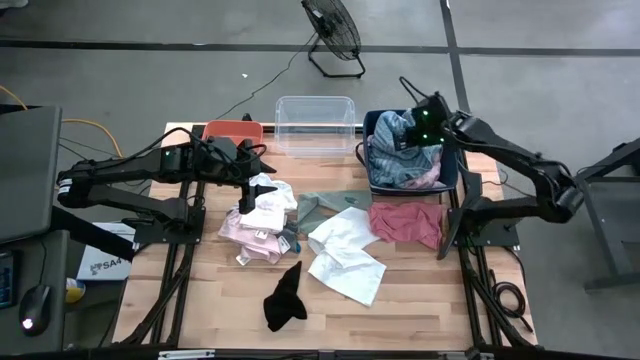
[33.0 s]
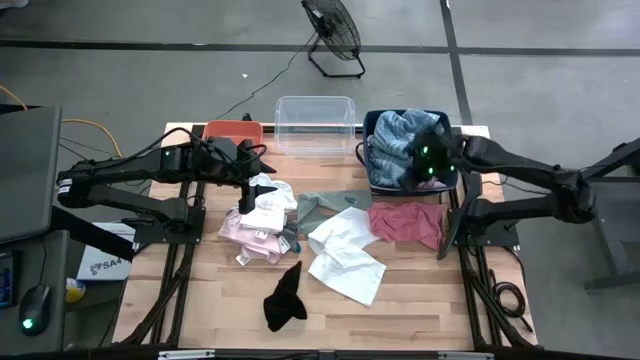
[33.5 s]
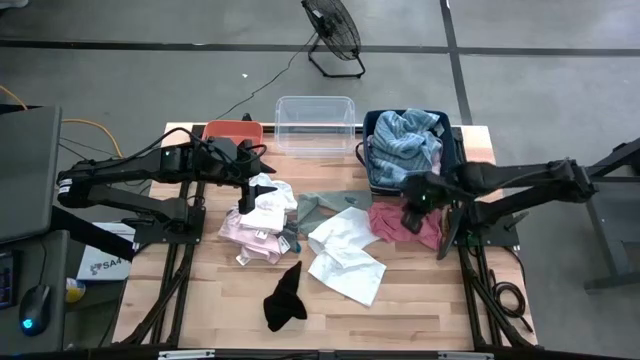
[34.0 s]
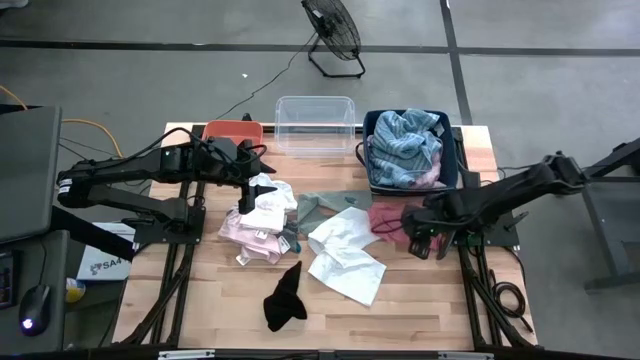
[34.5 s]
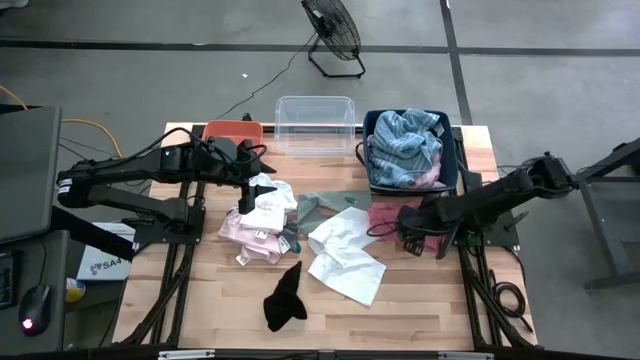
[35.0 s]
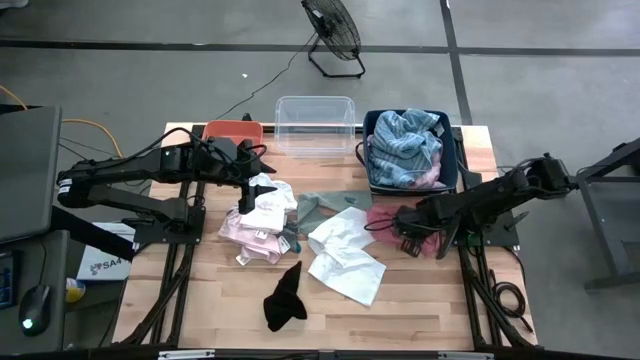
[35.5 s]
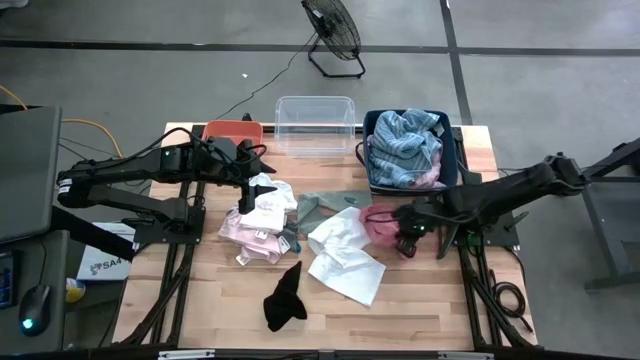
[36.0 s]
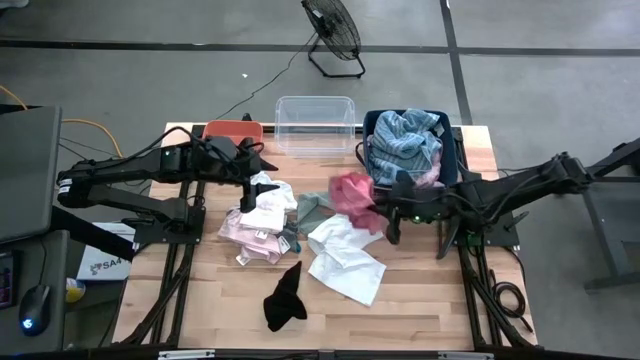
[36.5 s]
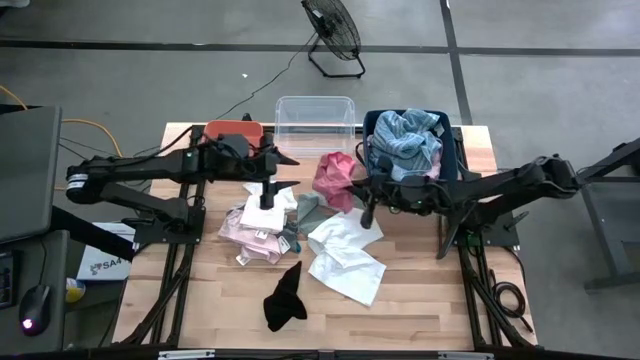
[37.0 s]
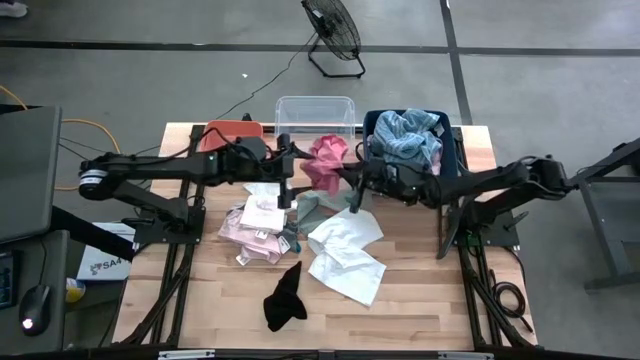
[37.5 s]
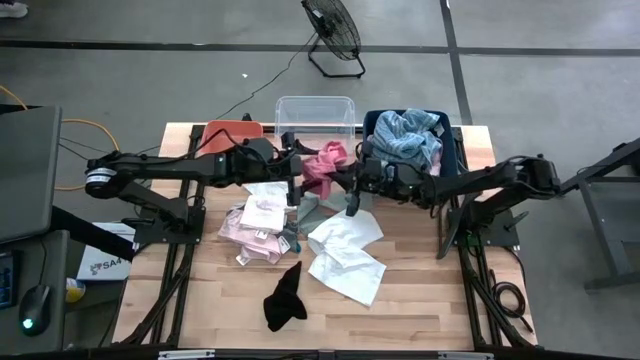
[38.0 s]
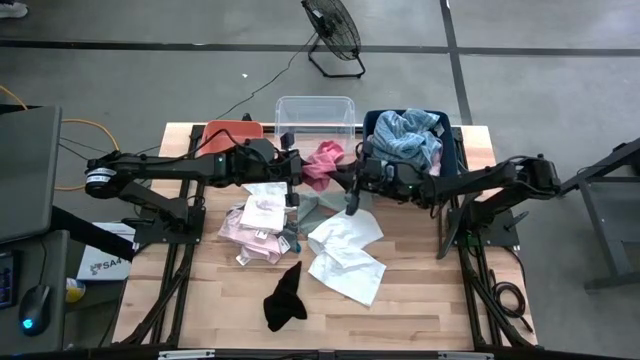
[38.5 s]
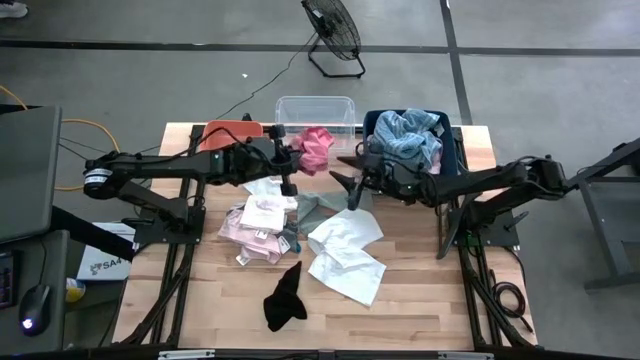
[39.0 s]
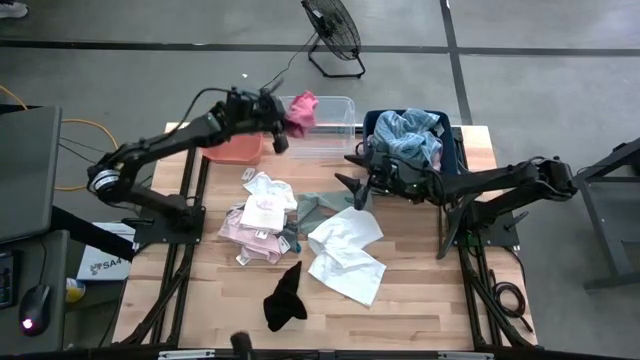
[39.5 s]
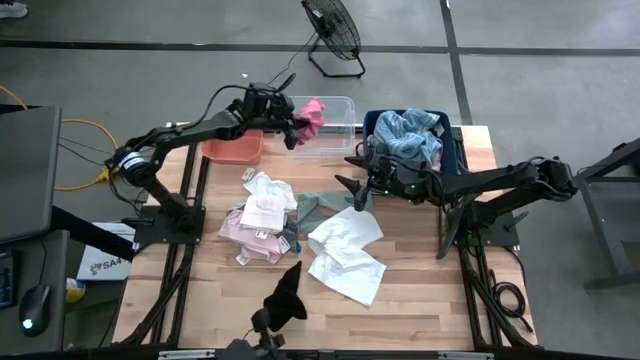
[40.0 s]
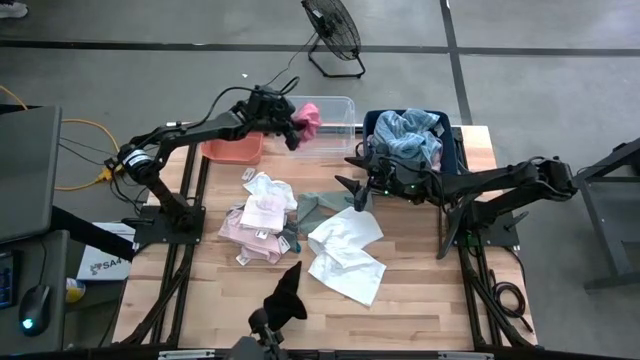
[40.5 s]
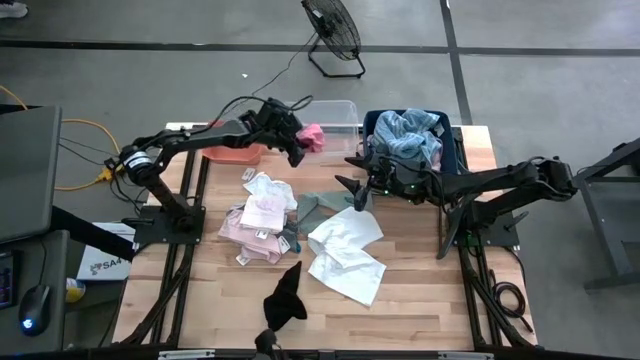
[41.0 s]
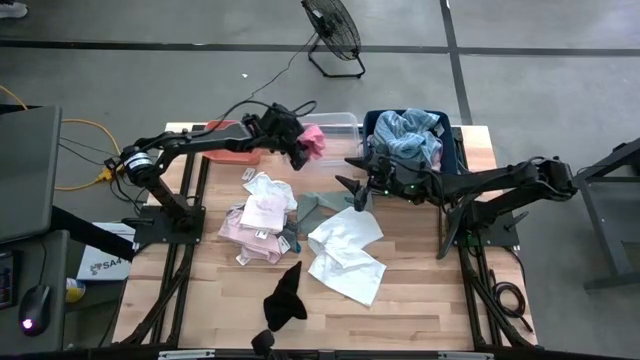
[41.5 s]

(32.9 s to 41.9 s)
Task: Pick & Place Cloths
Put the pink underwear into the transparent bin

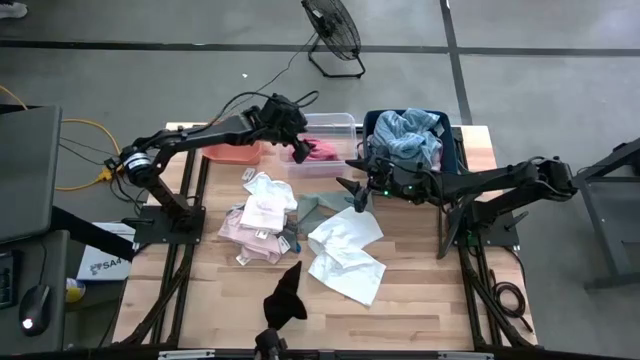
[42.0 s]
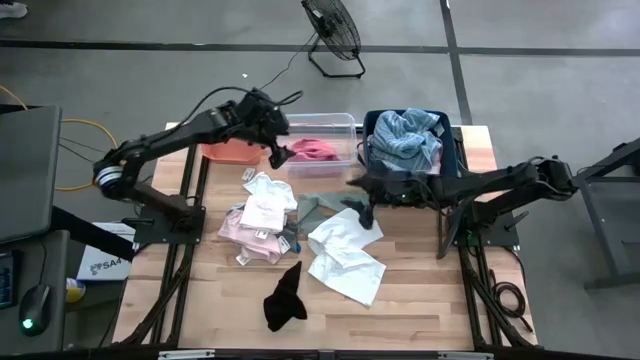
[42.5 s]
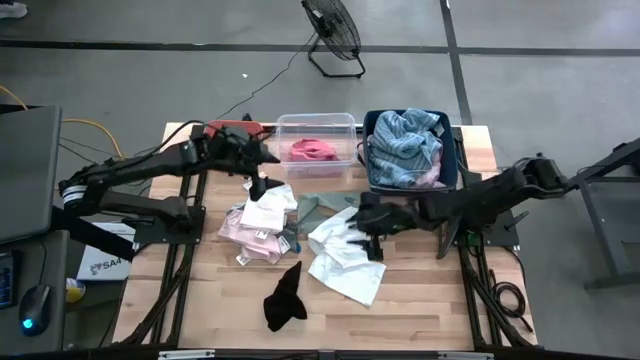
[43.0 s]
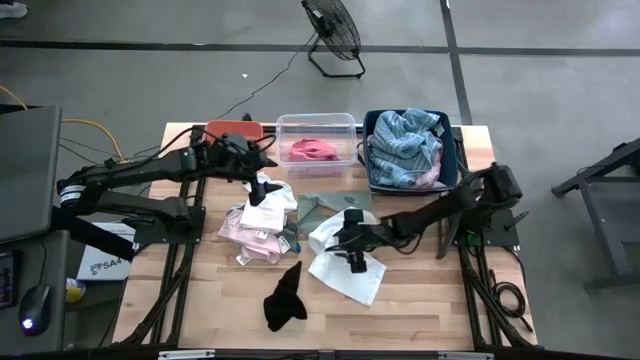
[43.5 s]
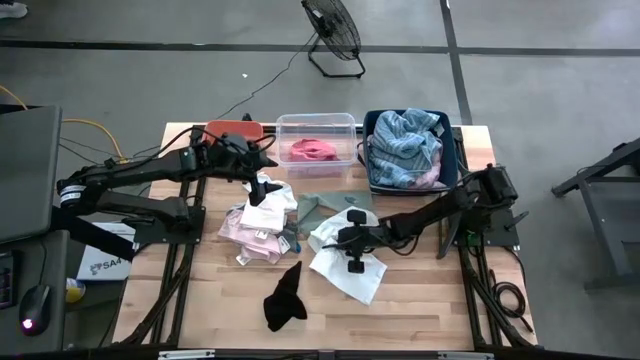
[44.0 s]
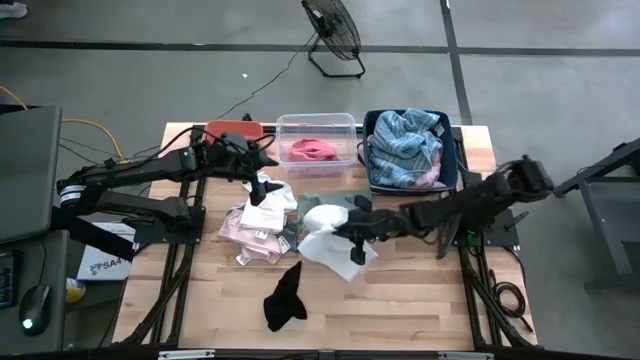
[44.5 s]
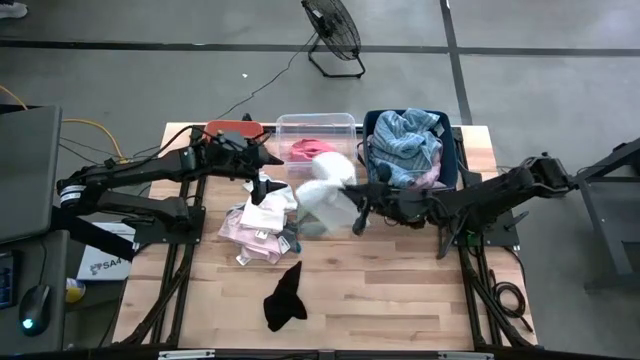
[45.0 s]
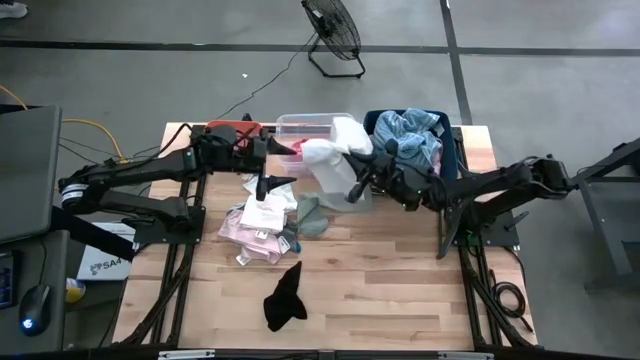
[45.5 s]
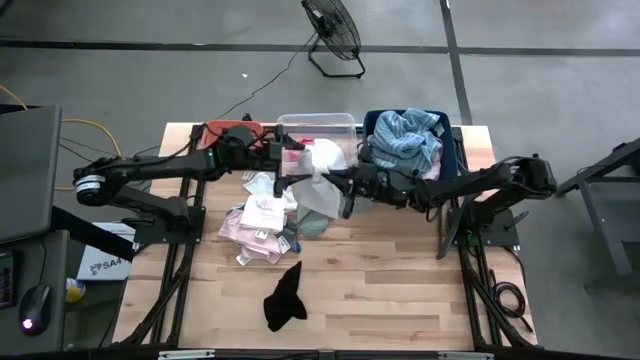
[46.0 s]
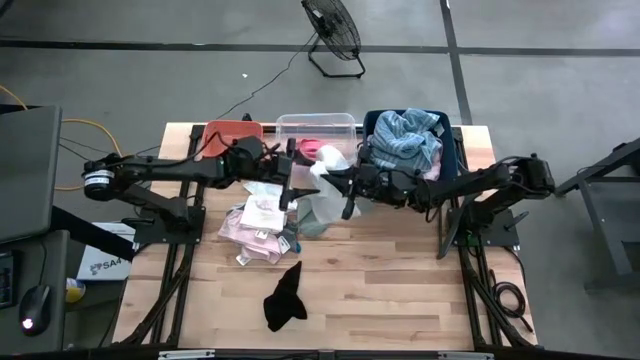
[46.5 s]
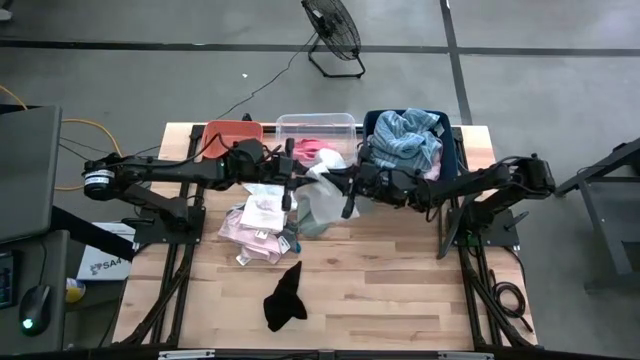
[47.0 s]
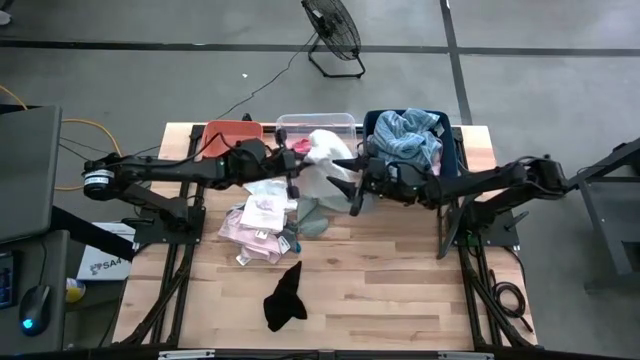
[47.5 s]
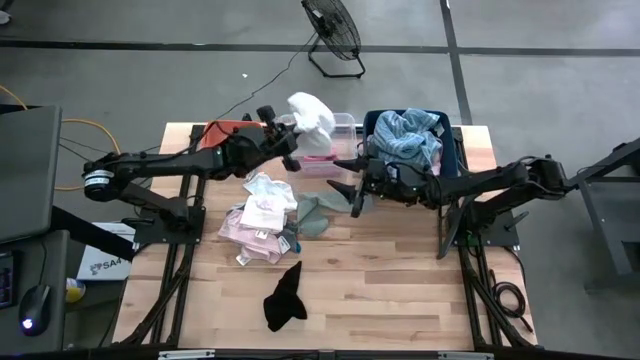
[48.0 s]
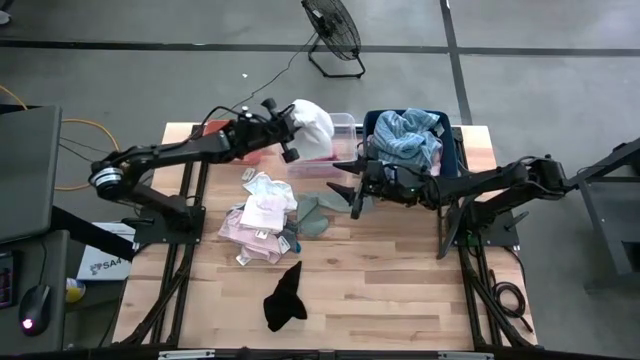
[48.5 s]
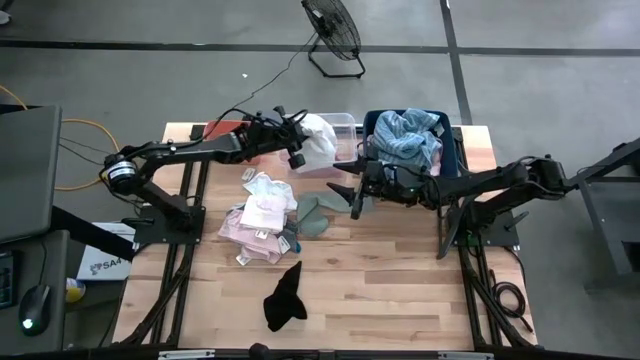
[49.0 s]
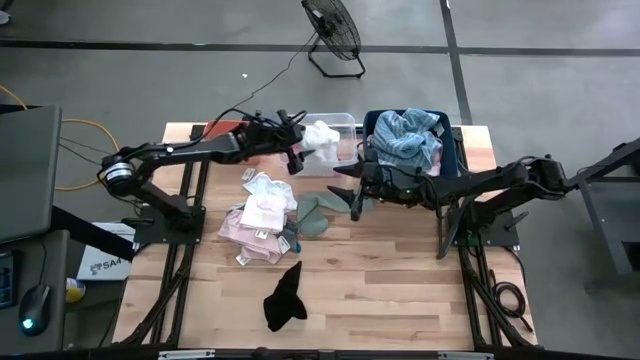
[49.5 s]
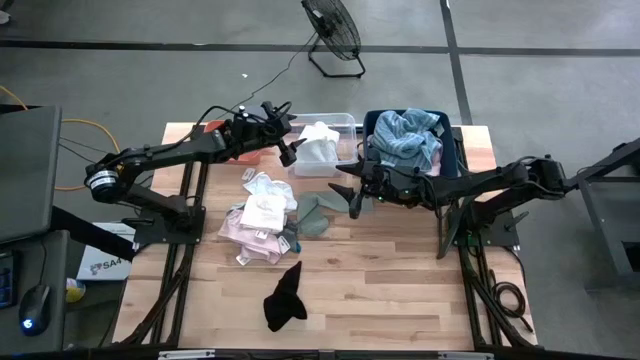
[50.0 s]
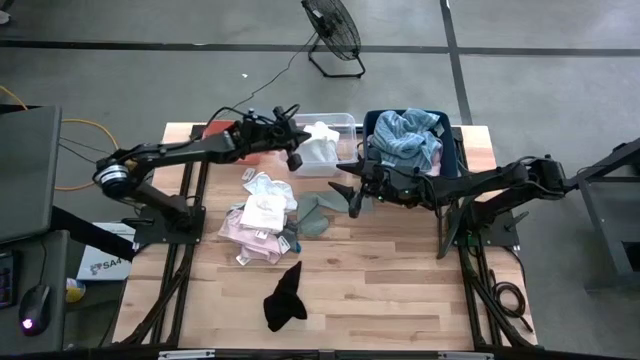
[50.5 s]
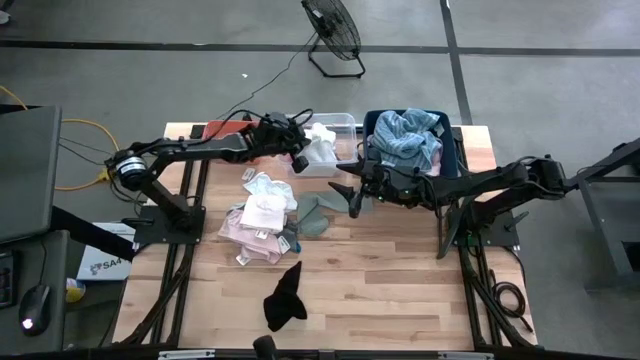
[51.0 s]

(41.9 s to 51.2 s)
Put the white underwear into the transparent bin

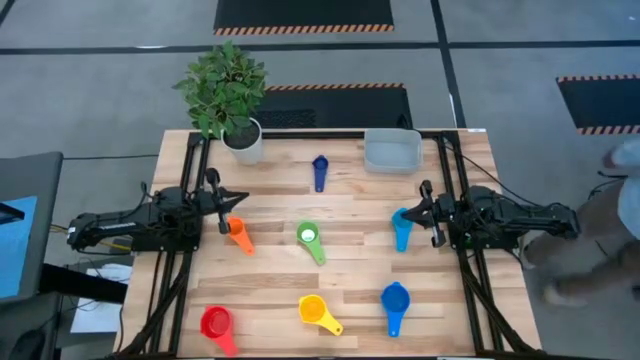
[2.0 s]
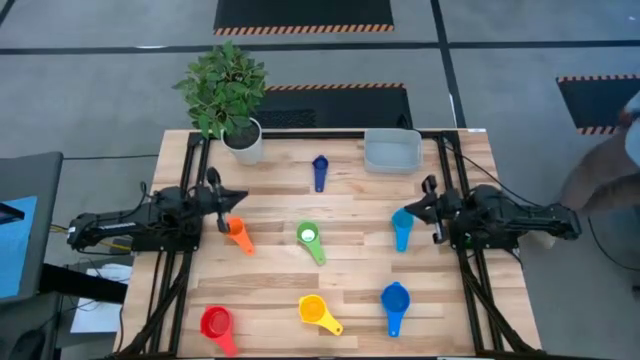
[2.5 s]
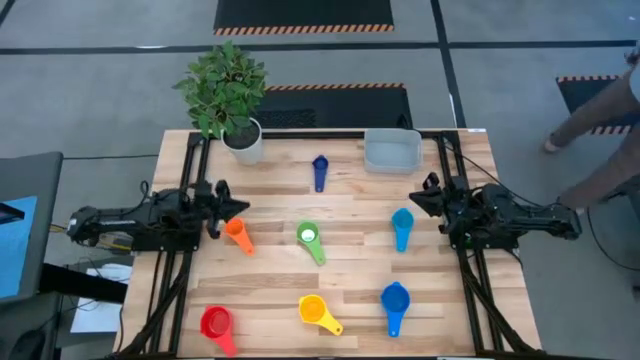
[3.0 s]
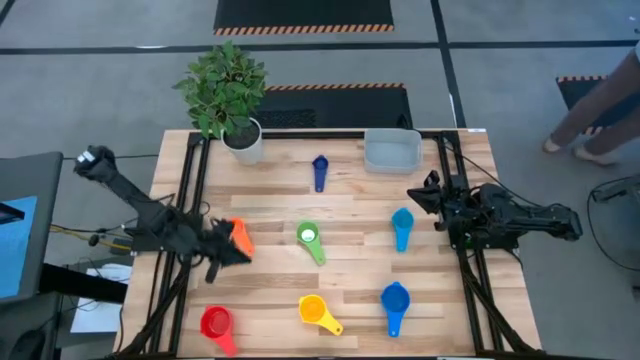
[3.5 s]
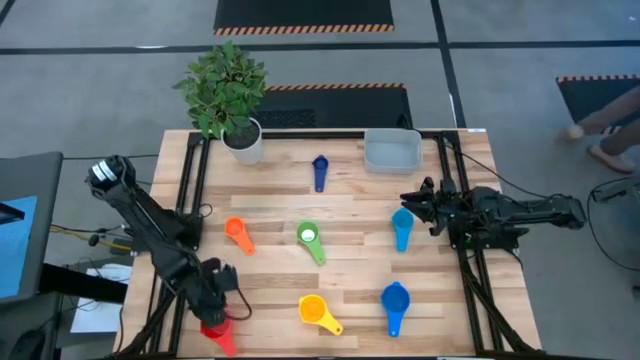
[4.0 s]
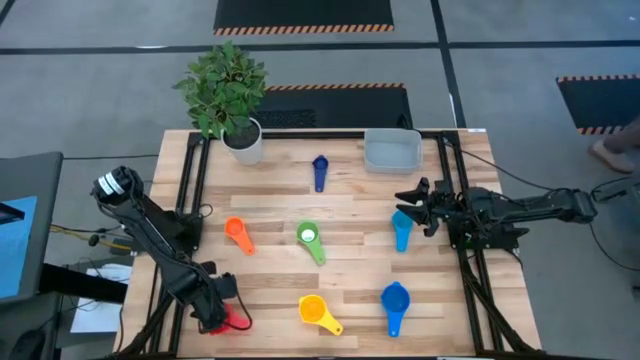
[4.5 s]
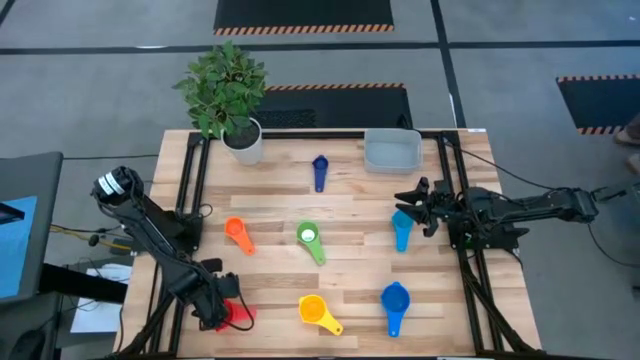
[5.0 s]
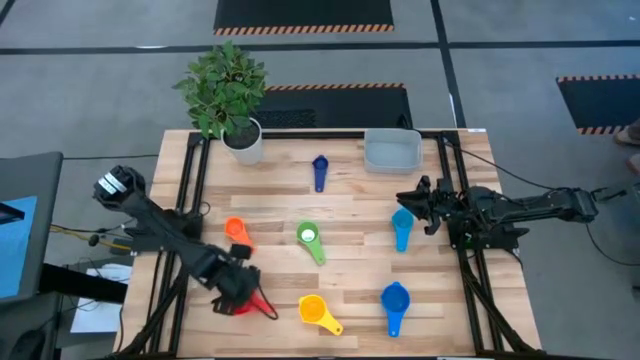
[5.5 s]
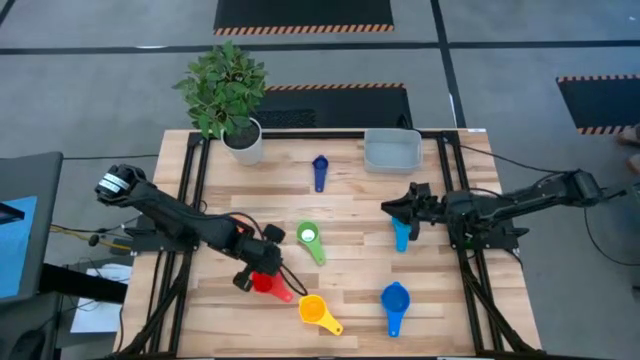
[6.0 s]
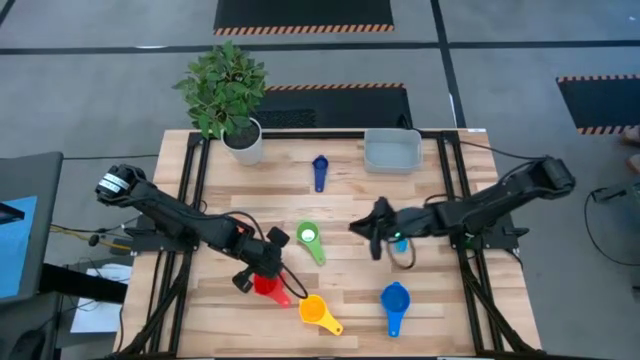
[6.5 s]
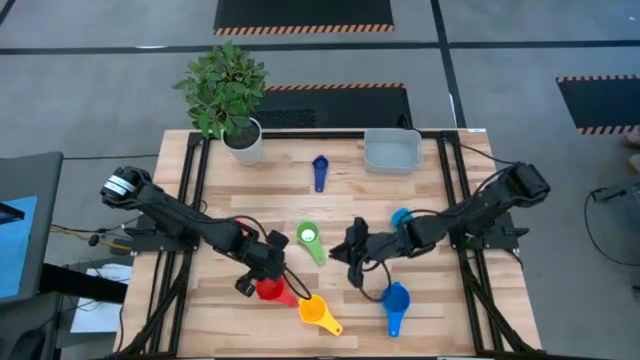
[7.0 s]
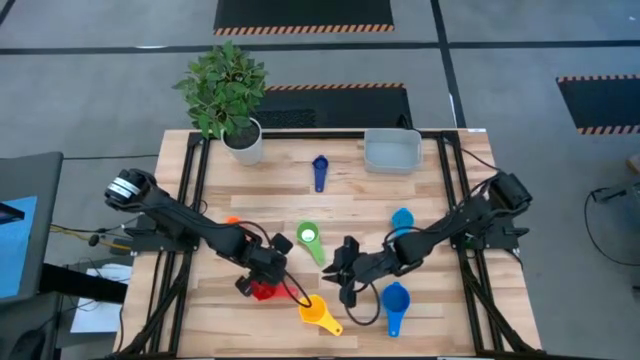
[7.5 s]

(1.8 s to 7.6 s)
Task: Nest measuring cups in basket
Move the red measuring cup towards the center of the table
